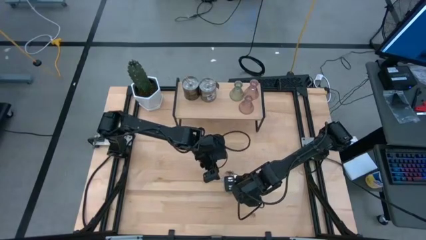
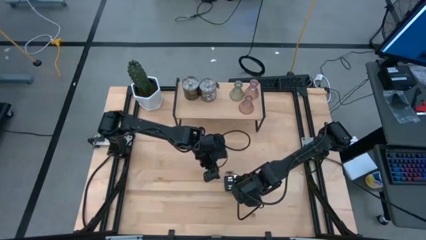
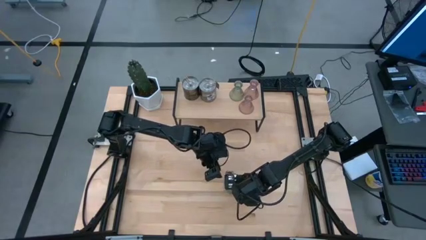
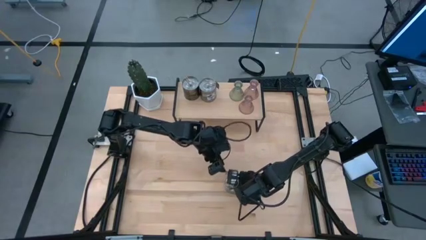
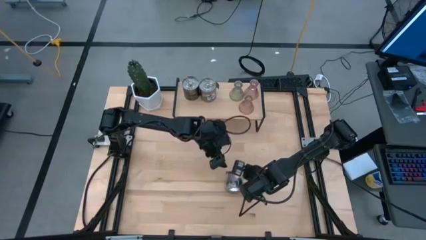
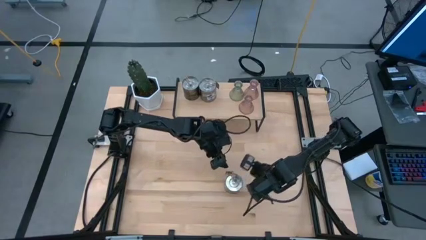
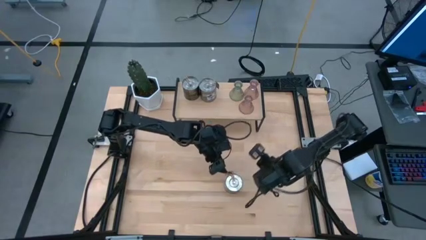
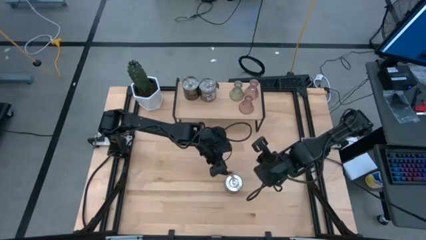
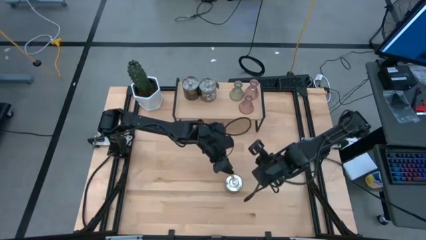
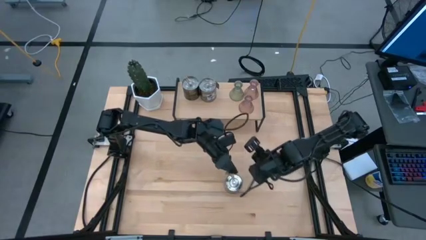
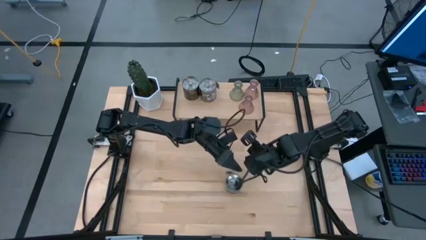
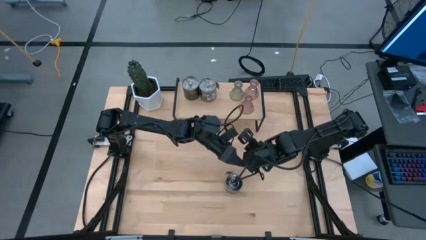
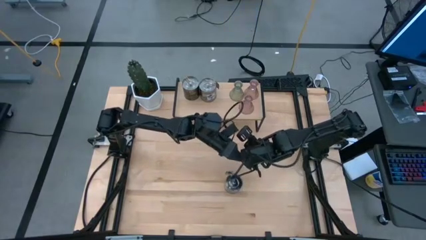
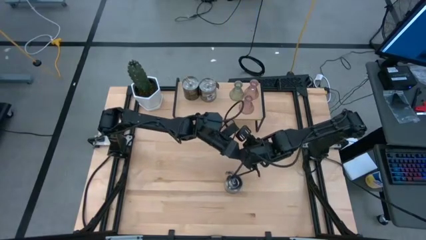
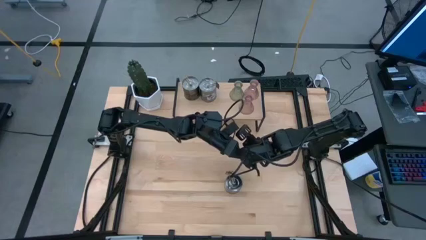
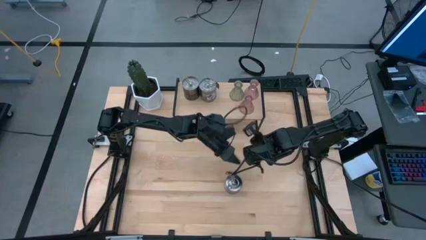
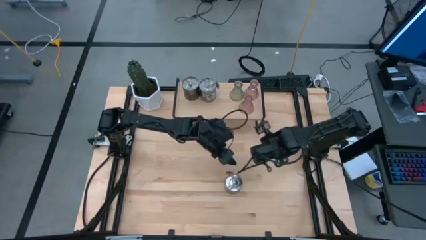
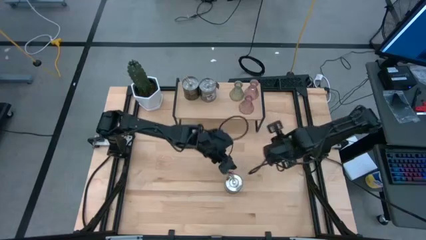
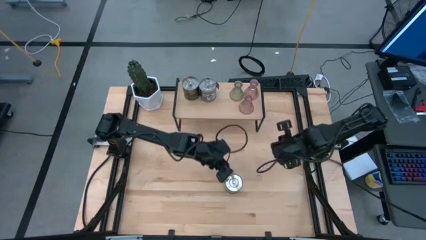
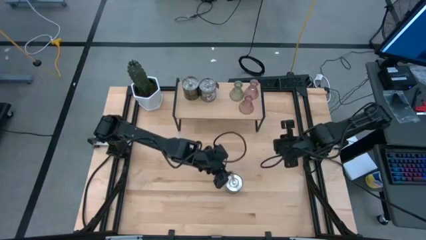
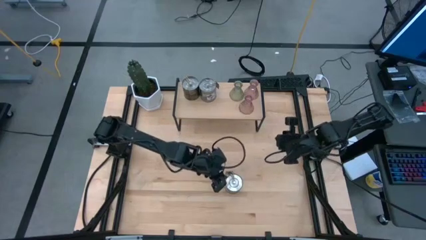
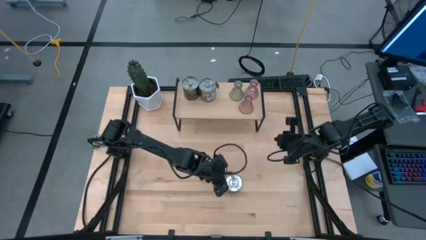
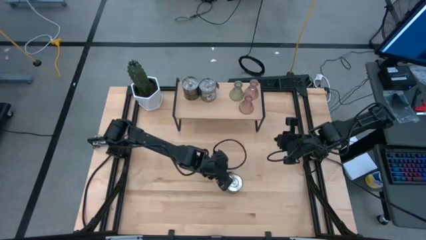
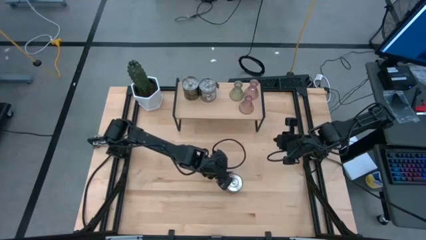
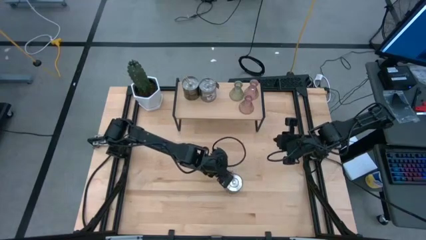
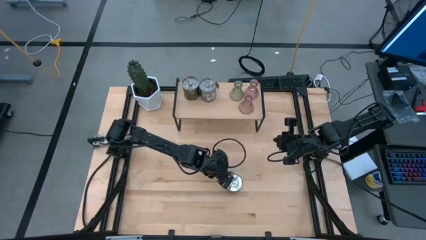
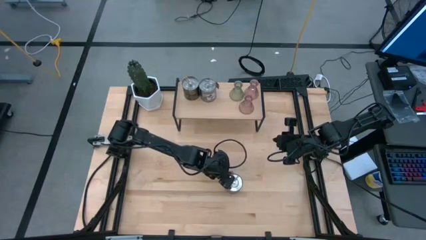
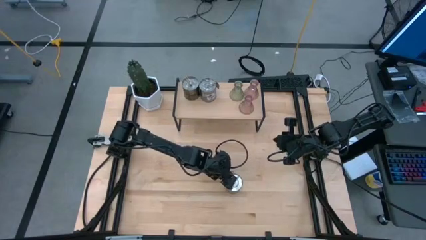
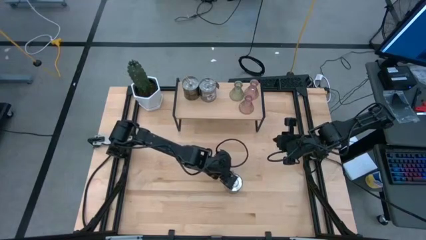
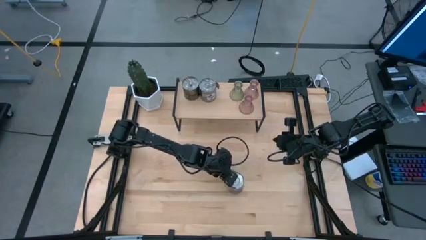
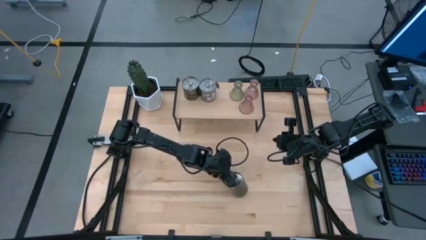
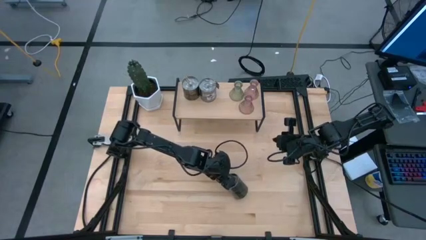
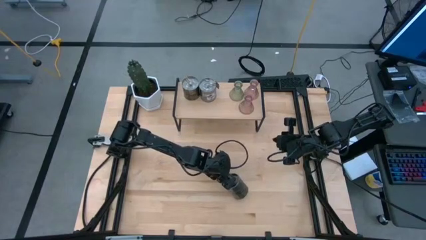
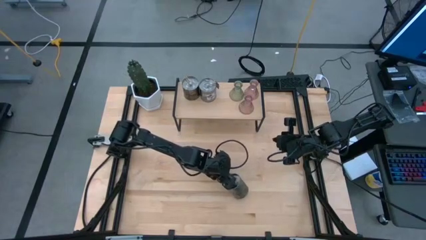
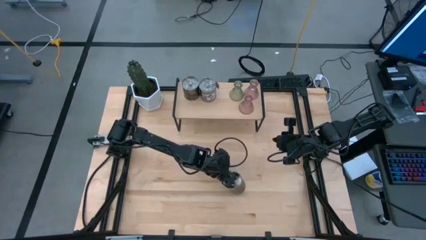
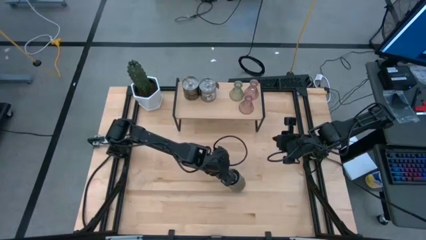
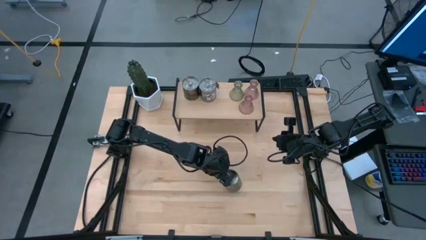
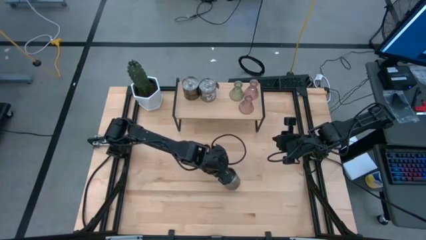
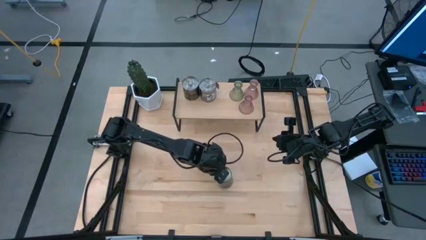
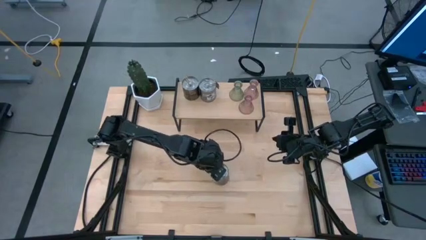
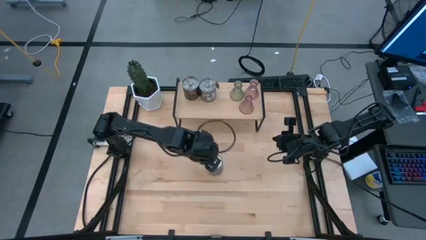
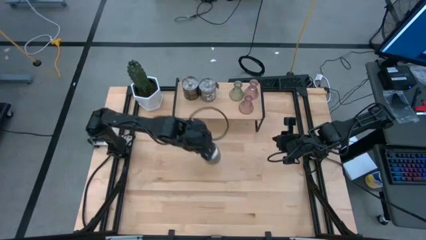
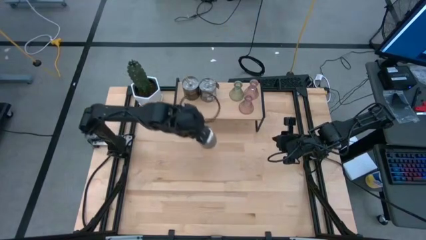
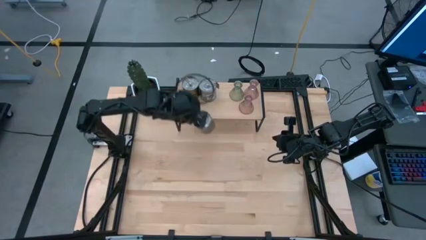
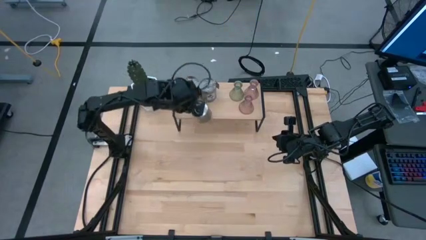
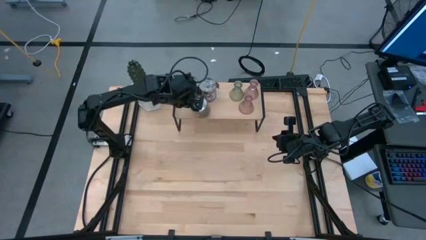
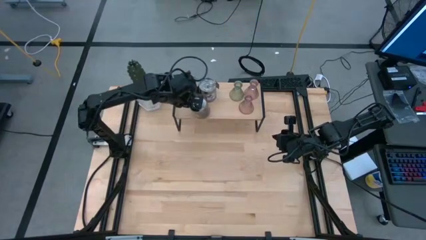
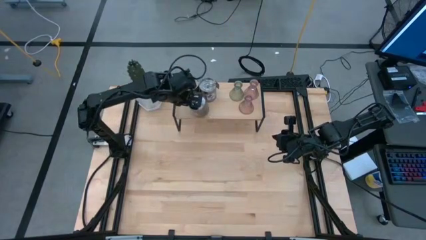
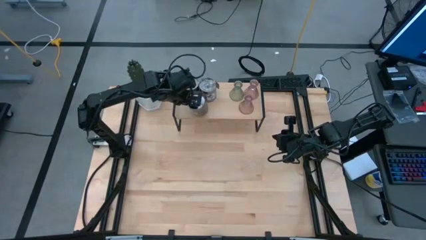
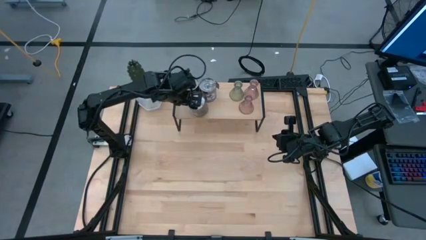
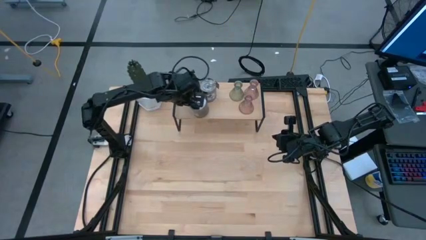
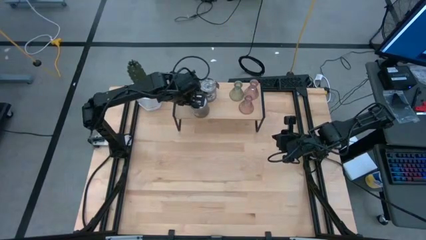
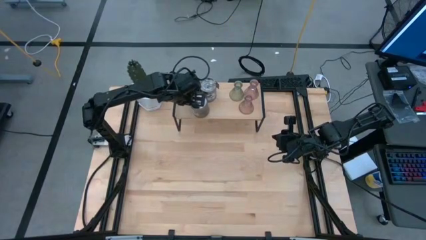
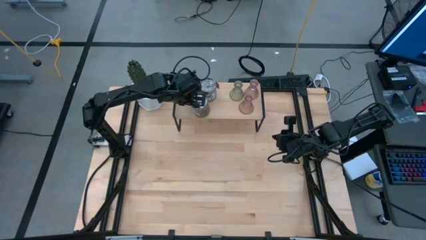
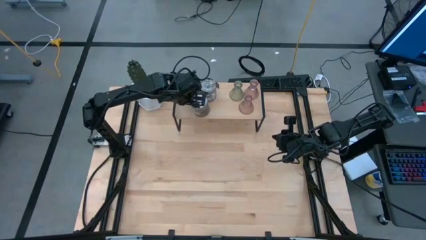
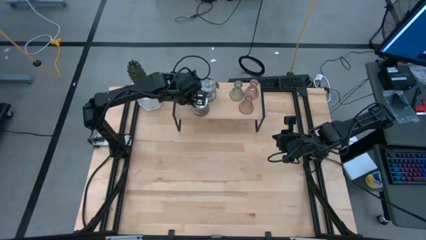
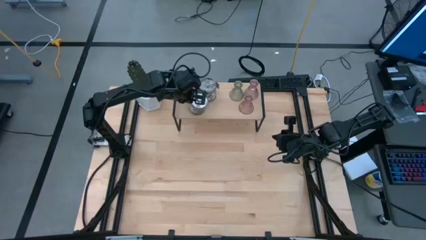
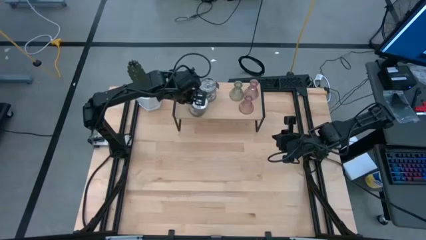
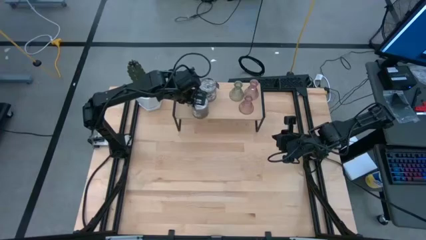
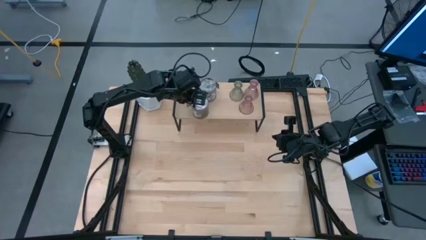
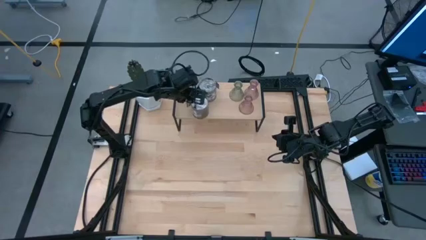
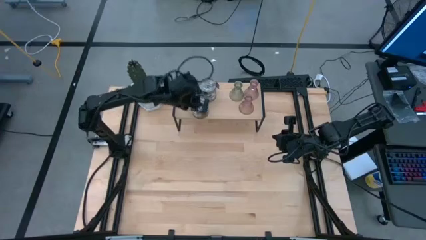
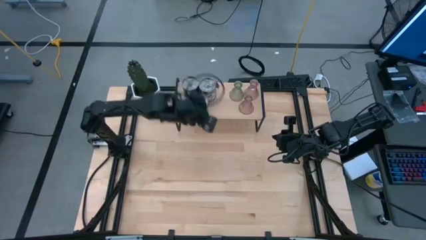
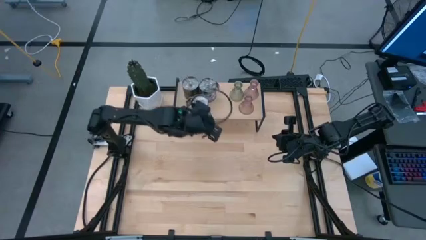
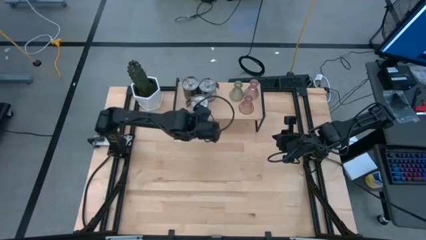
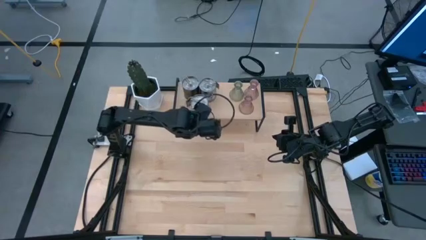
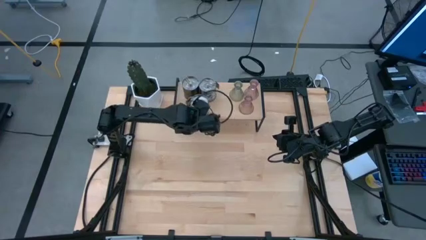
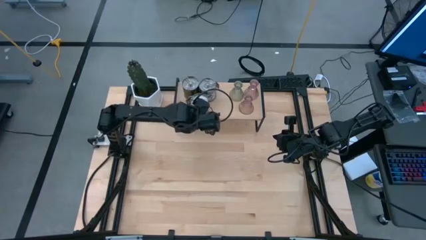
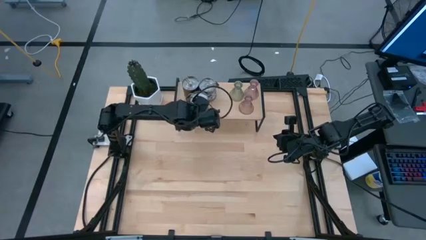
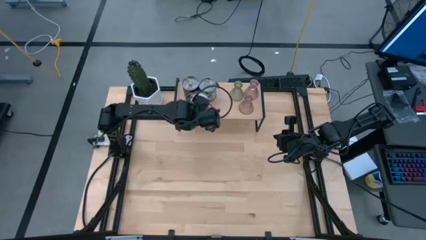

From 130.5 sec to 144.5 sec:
Task: Pick & Place candle stick holders
Put the brown scented candle on the shelf

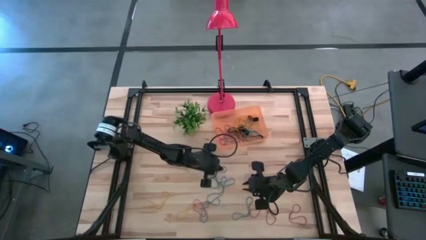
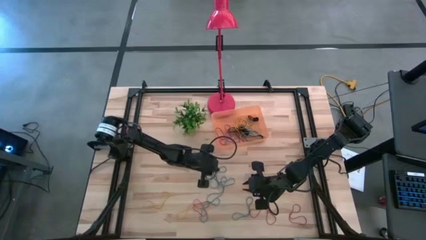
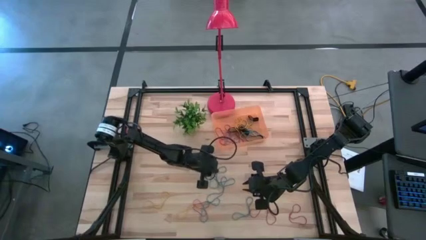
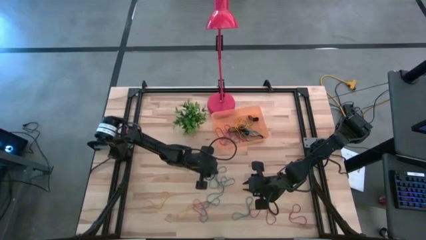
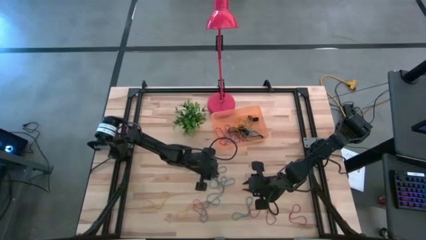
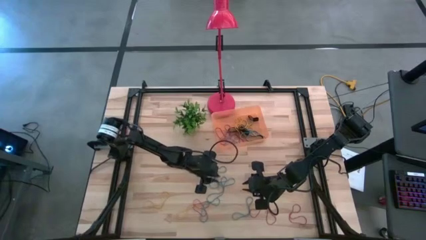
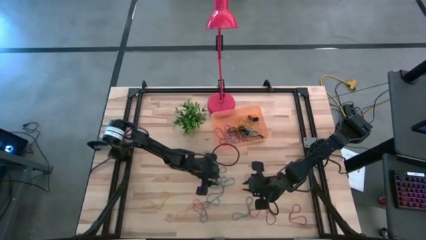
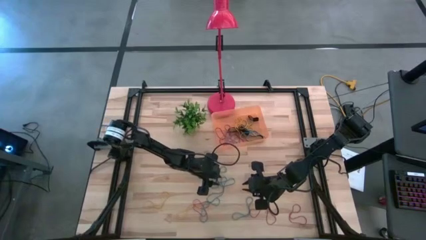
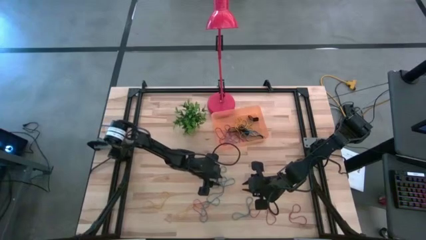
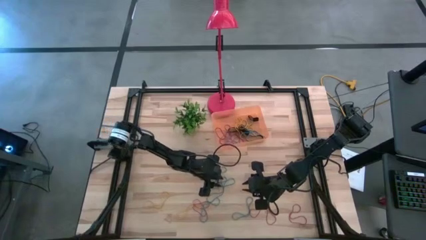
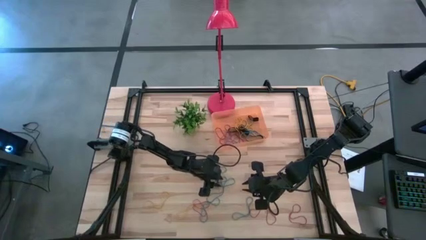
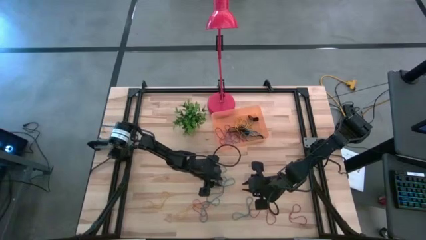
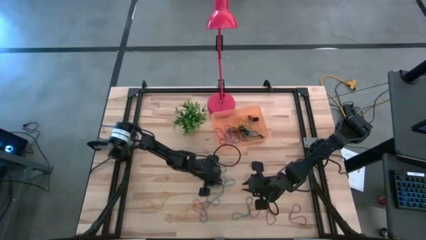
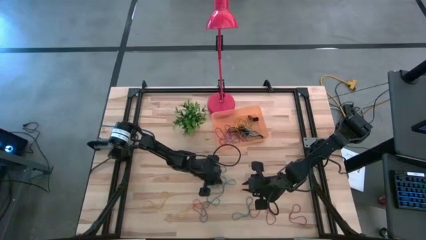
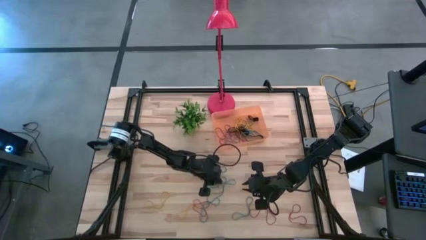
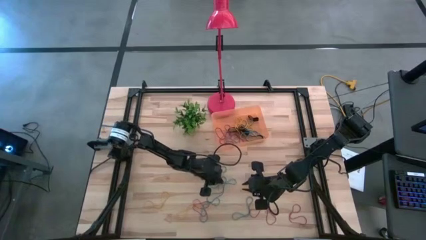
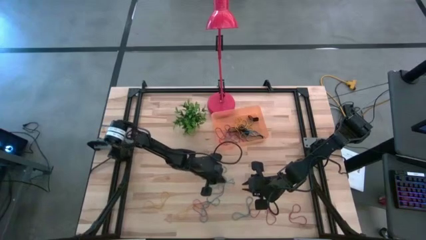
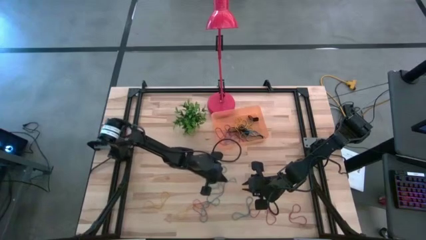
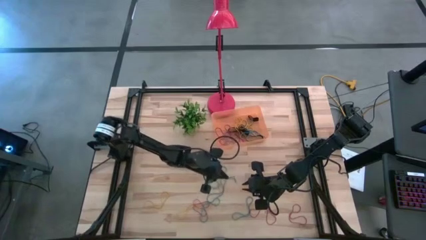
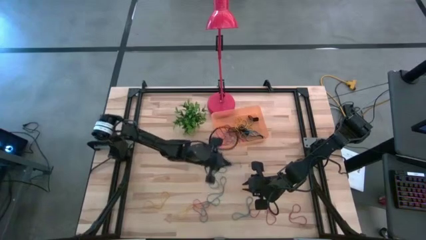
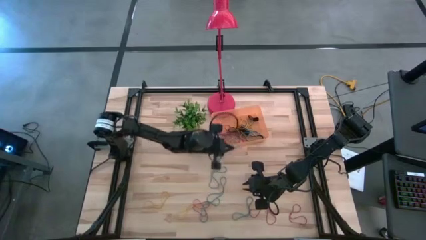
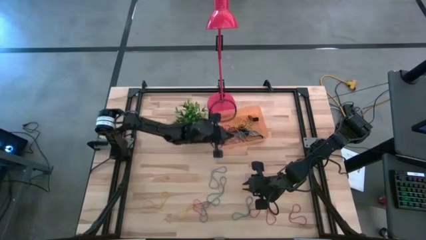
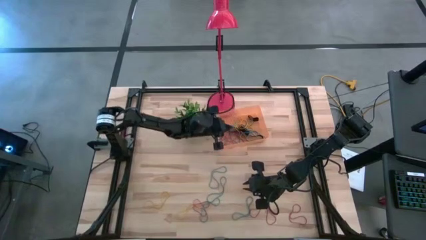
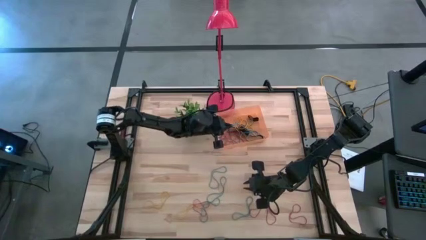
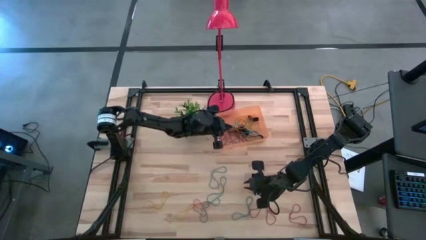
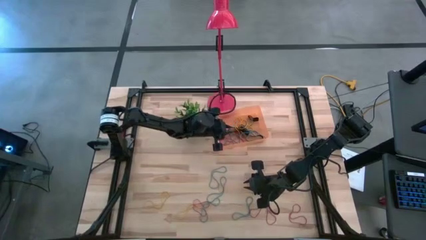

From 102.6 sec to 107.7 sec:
Task: Pick and place rubber bands into bin
Put the blue rubberband into the orange container
